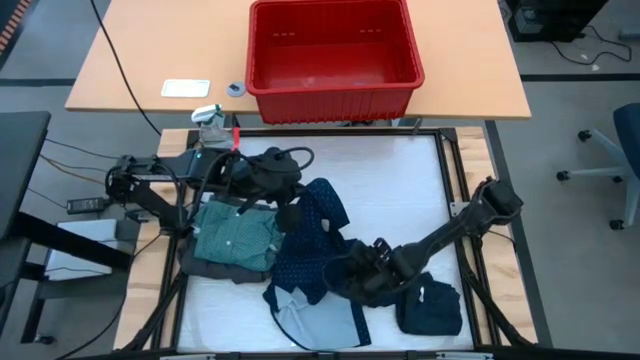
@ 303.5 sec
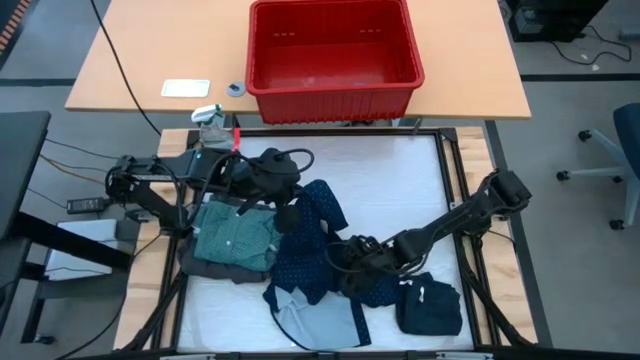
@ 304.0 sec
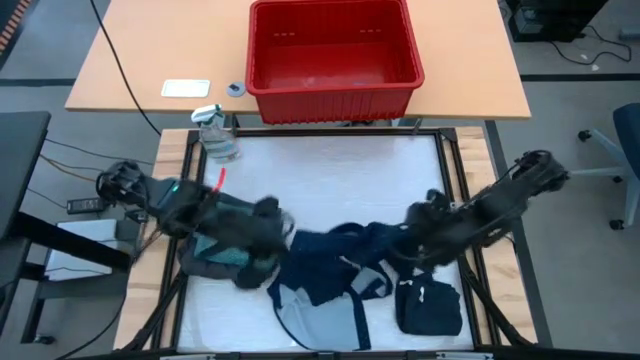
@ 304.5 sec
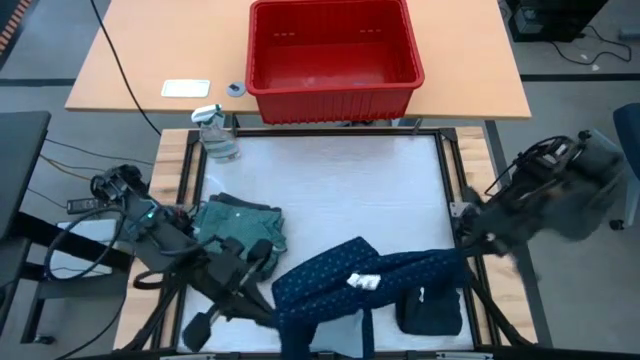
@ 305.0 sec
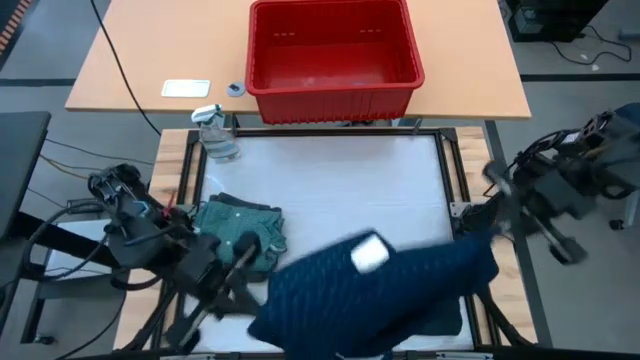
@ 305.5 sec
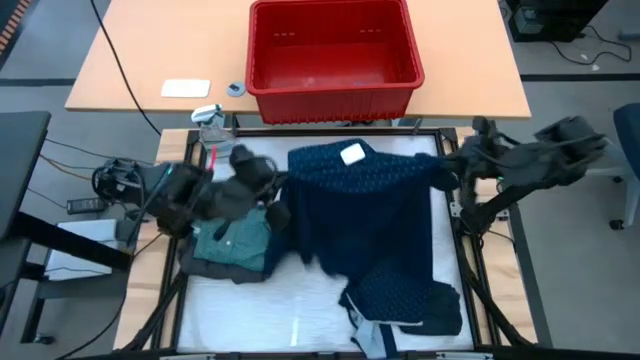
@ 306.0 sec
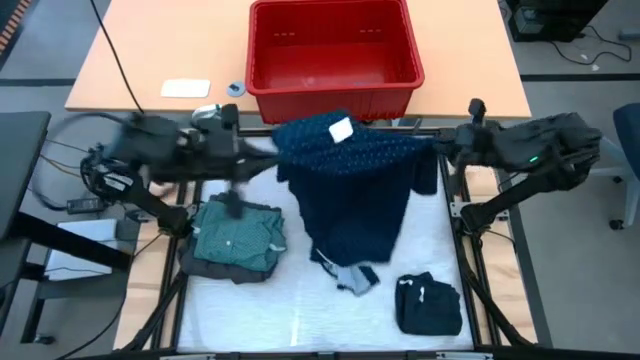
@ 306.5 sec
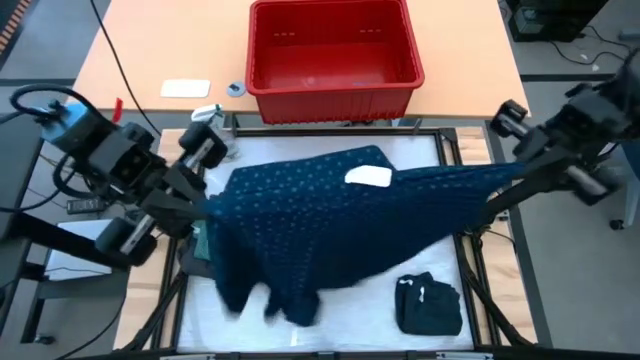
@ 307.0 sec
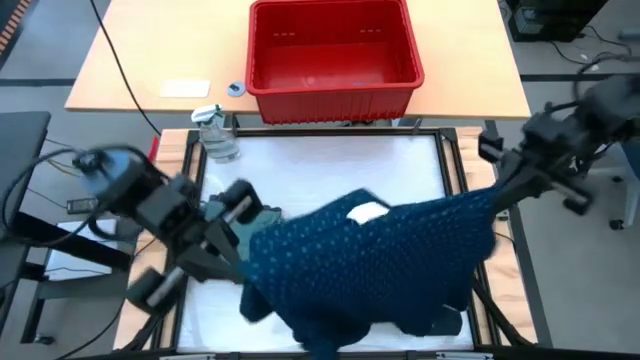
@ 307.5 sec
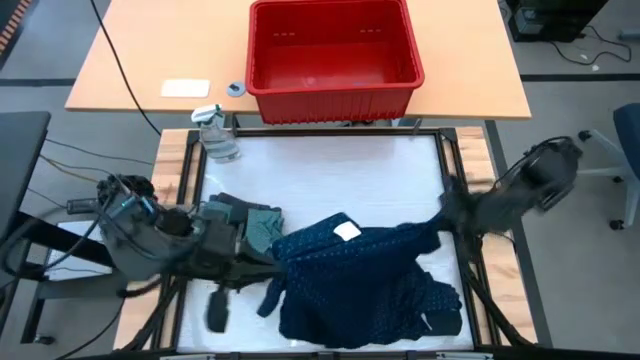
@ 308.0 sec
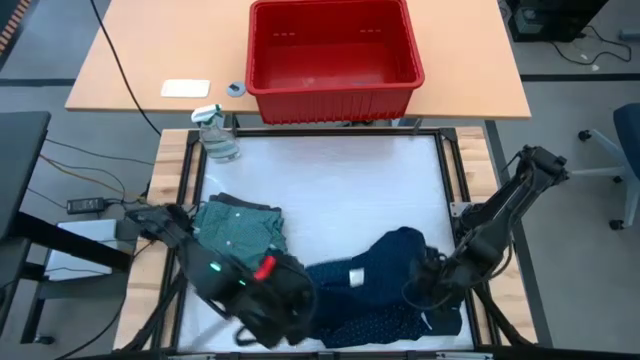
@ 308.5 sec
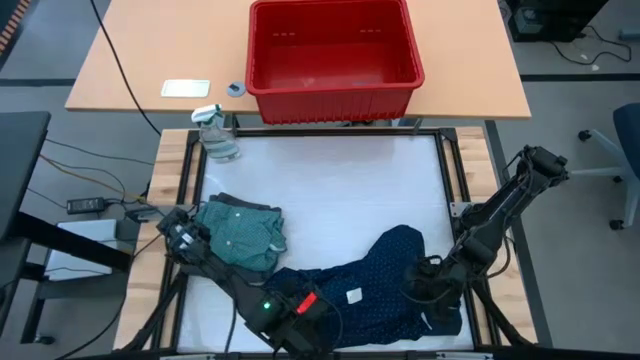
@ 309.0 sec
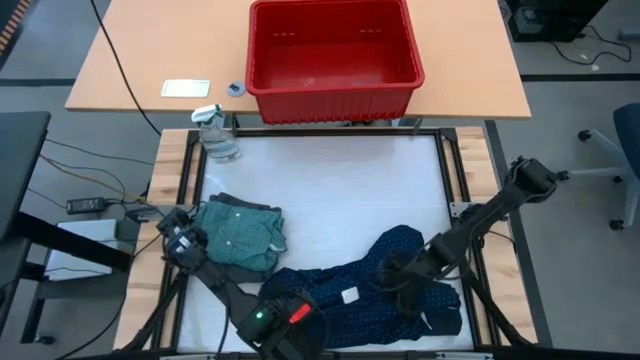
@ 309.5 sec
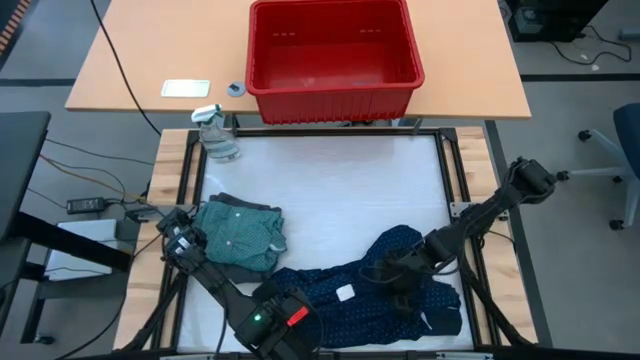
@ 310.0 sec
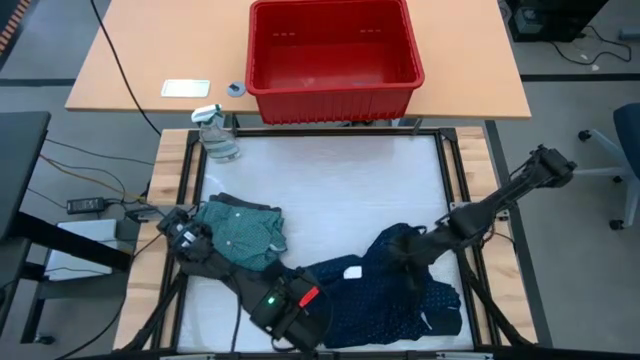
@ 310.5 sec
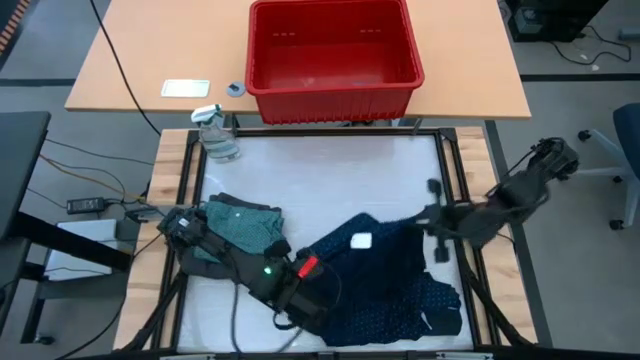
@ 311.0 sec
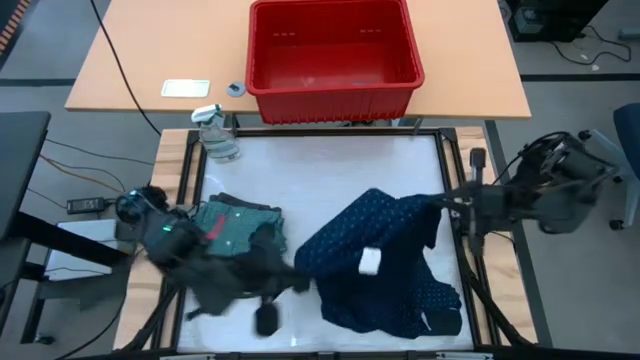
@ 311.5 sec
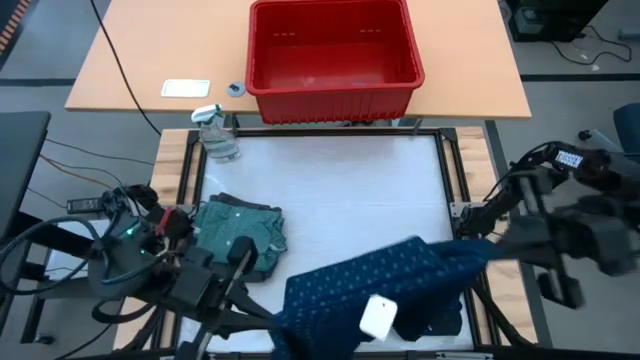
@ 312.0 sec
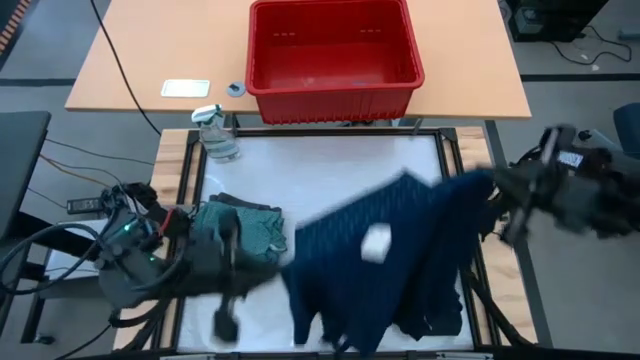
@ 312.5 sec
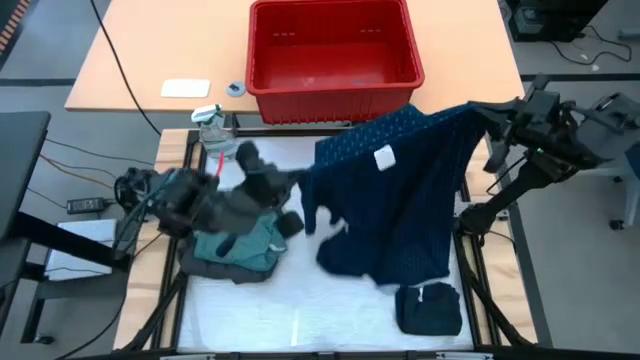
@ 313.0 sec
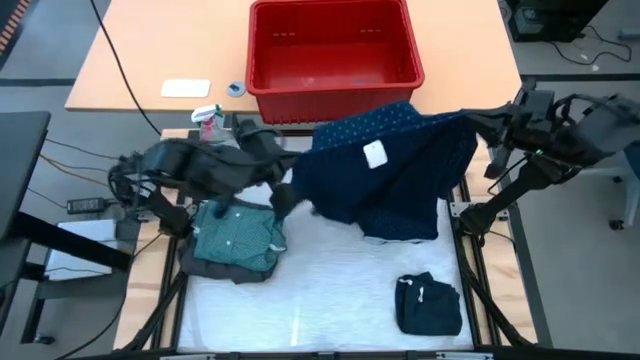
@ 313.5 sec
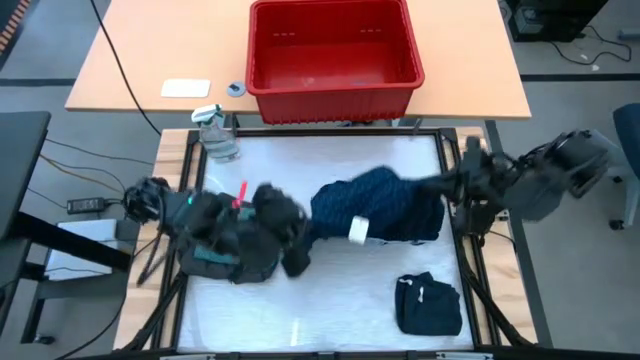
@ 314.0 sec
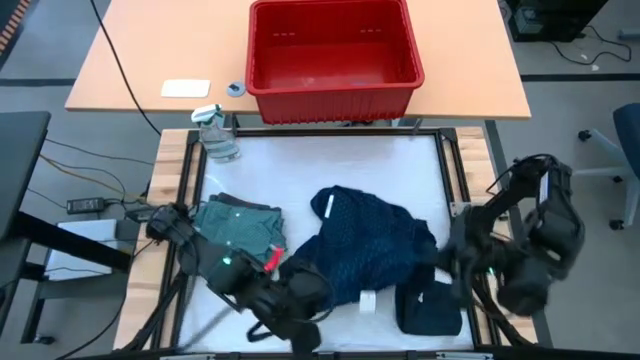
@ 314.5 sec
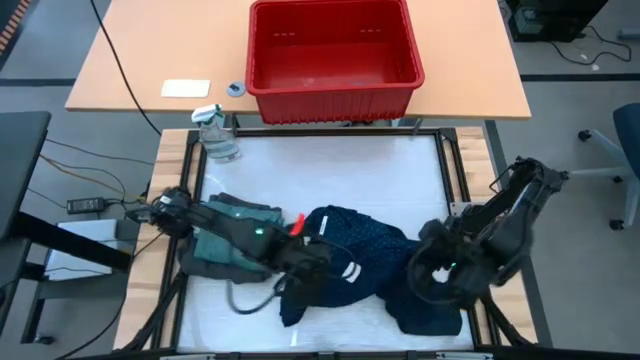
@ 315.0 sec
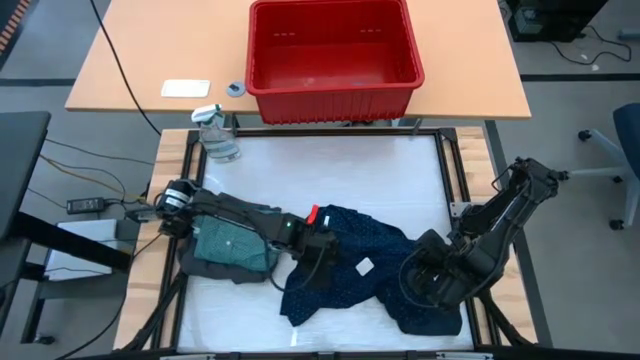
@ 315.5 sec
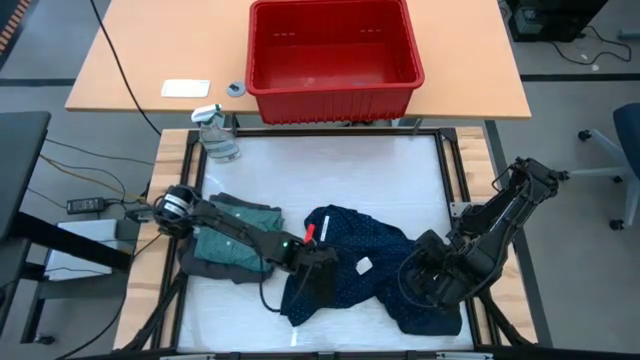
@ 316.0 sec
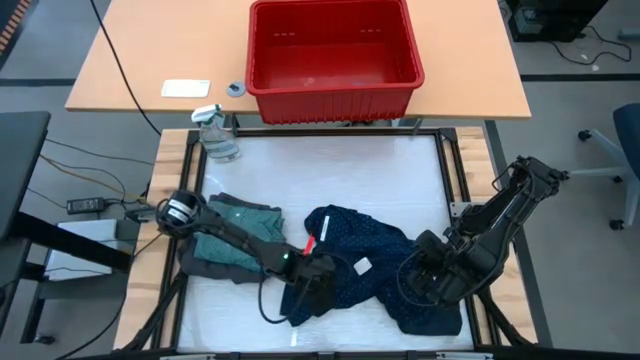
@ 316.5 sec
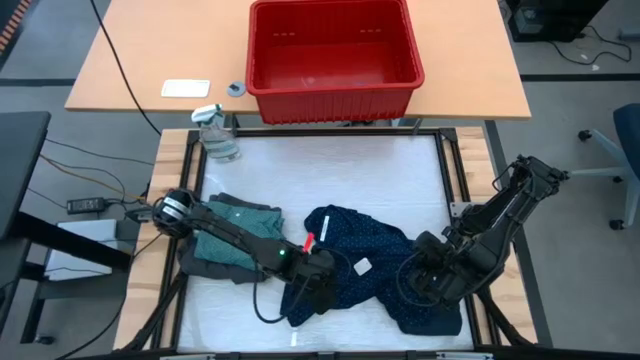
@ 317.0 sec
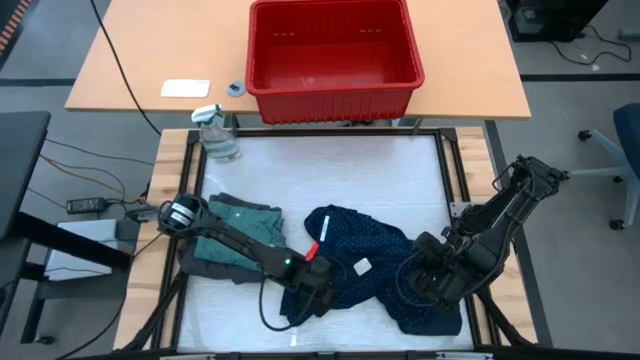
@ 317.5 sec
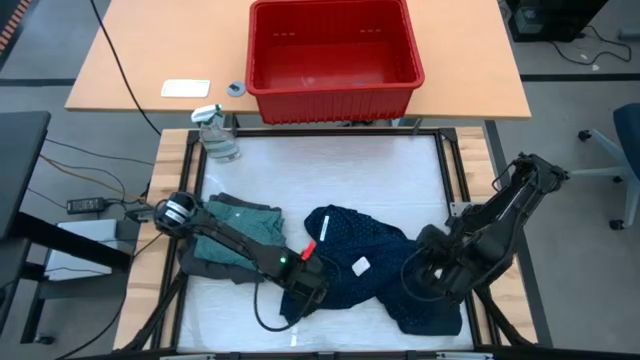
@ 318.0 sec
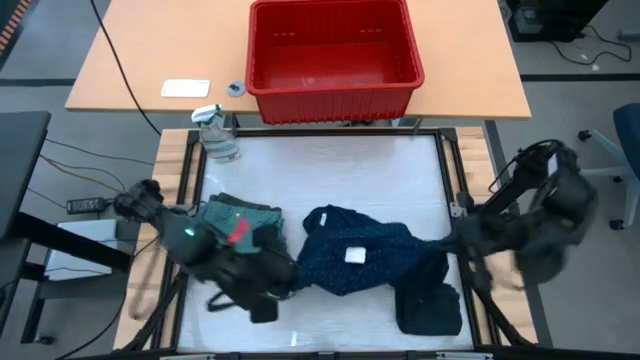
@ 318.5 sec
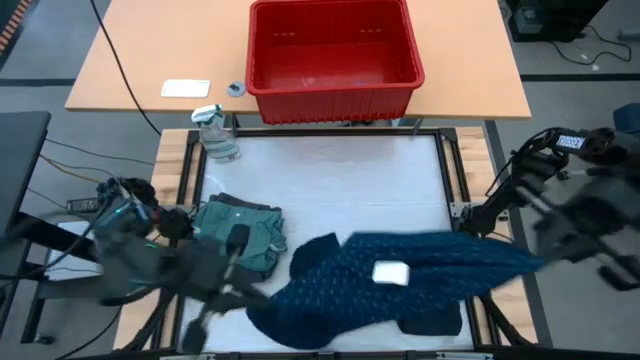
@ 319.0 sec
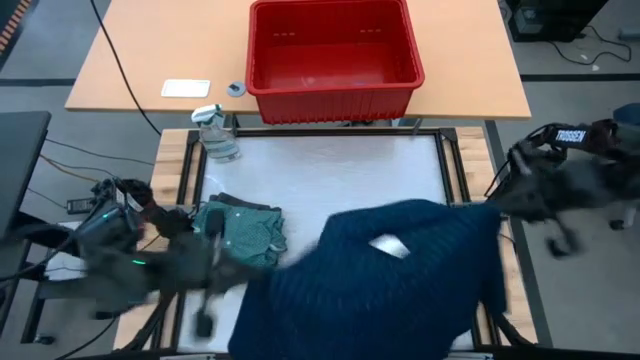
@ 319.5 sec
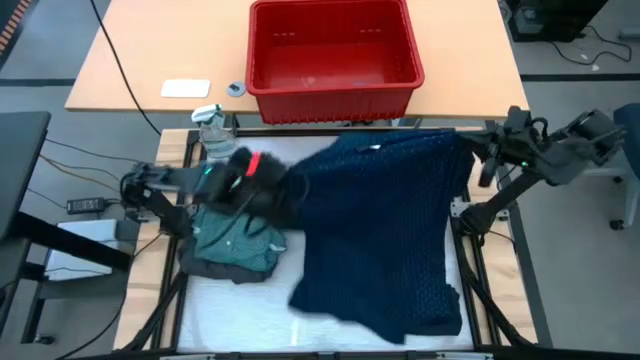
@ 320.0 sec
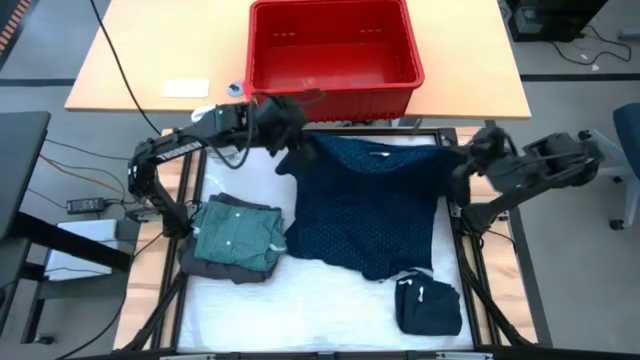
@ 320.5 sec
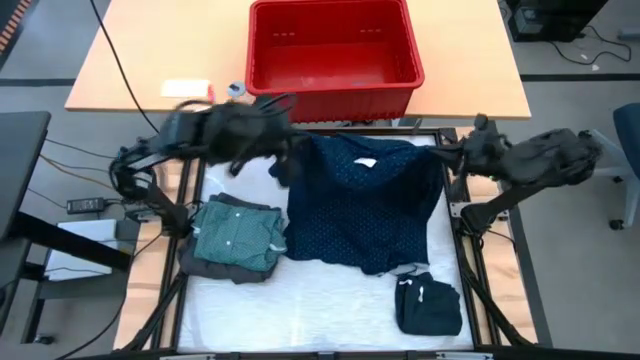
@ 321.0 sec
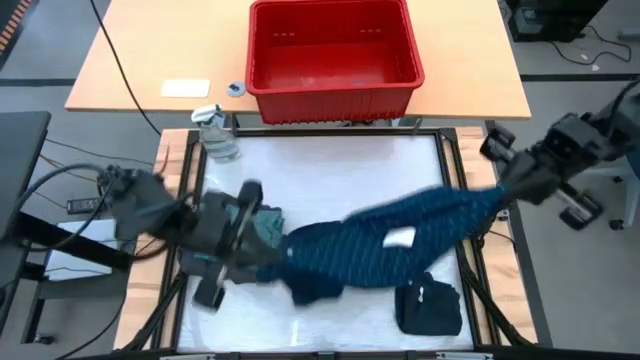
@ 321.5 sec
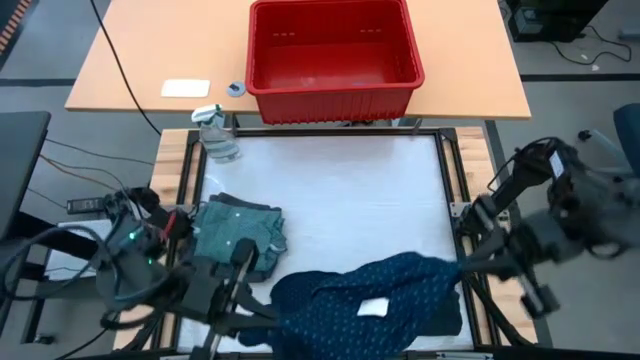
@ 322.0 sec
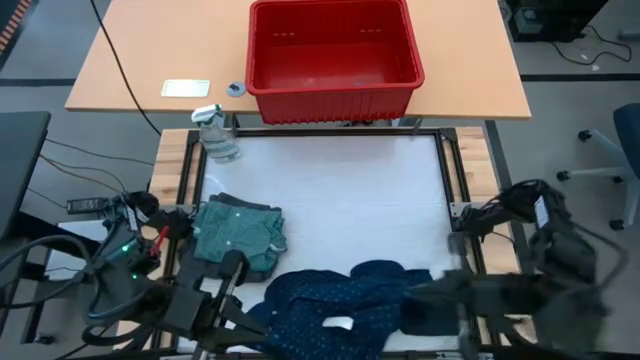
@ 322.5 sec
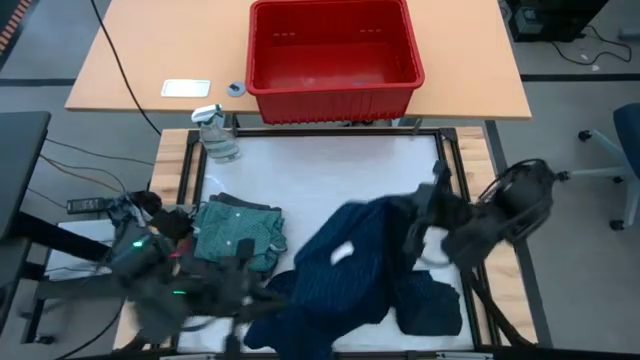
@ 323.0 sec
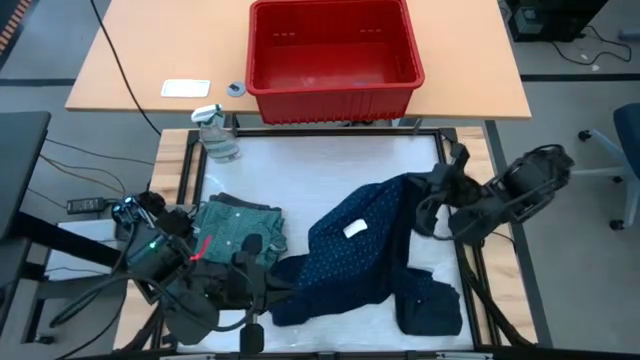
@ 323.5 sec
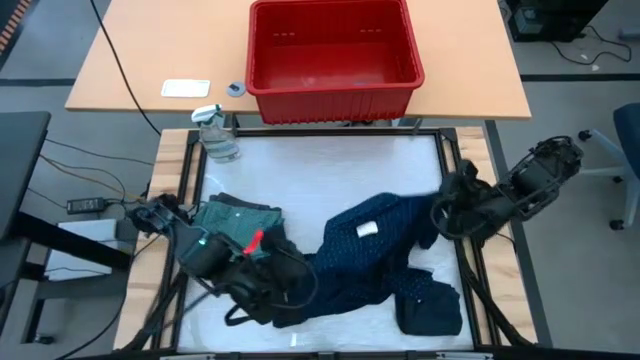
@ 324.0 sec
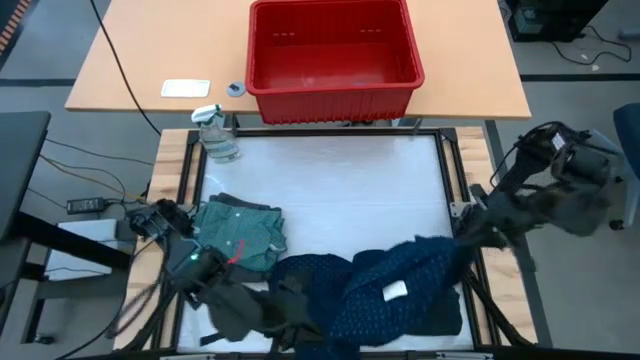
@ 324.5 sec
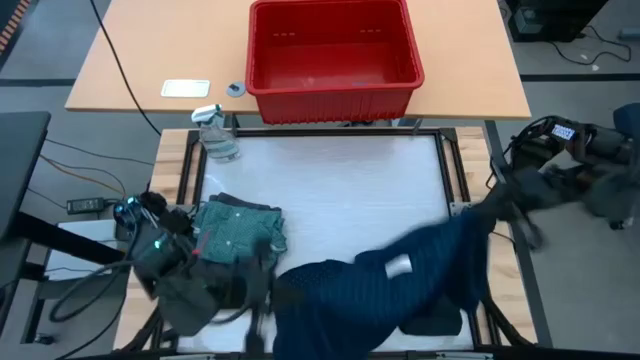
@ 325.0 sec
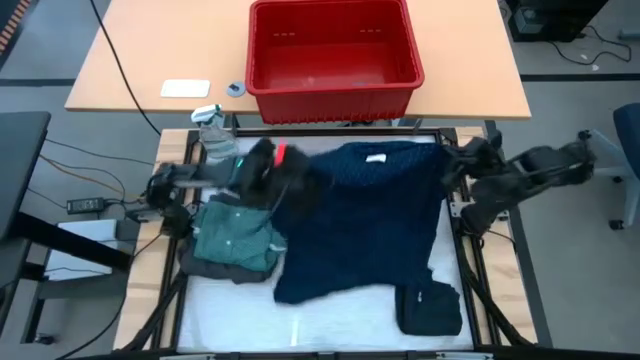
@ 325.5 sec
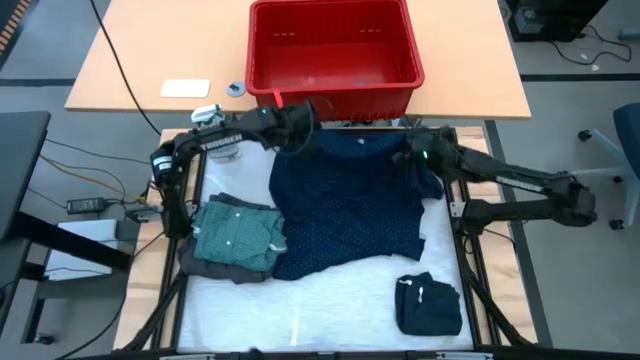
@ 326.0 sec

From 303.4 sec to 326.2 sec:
Task: Fold Laundry from Bin
Fold the blue polo shirt on the table
